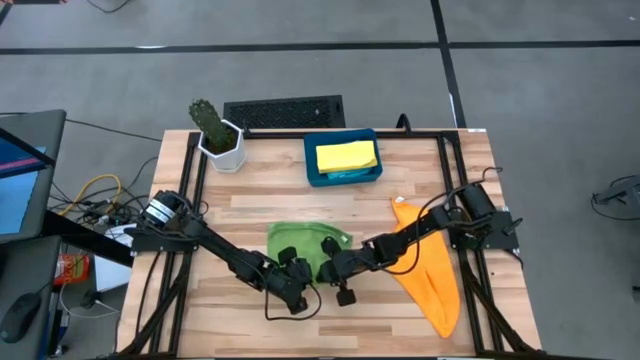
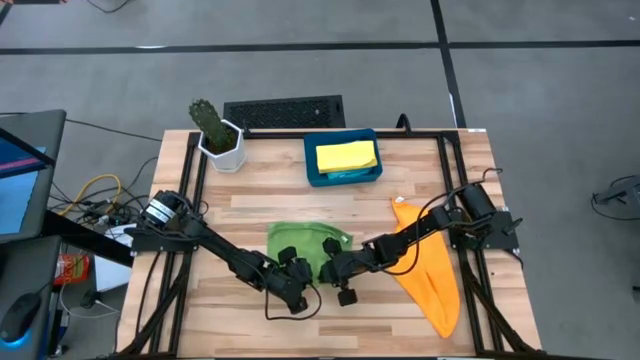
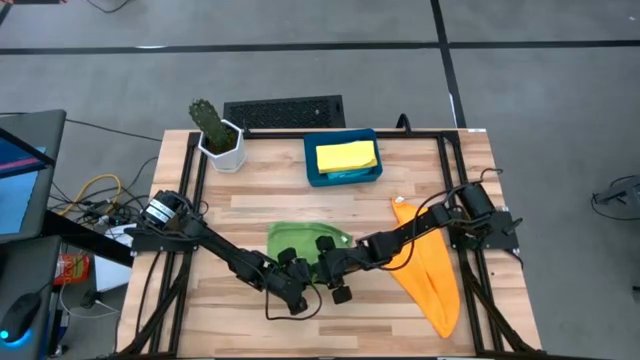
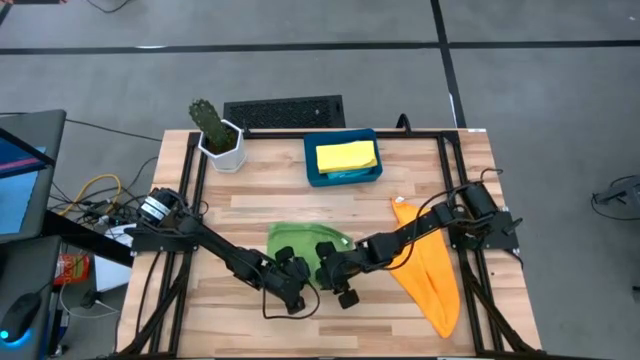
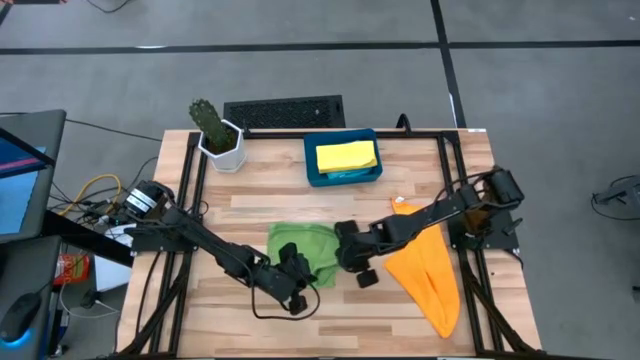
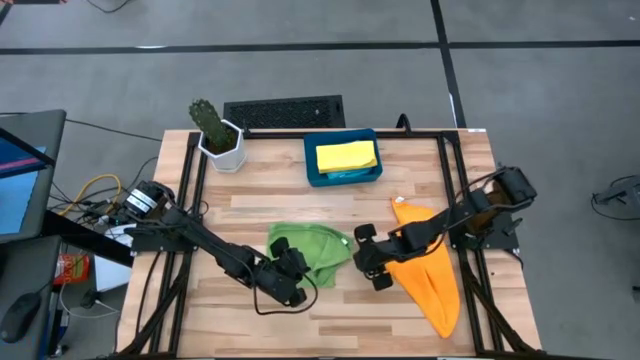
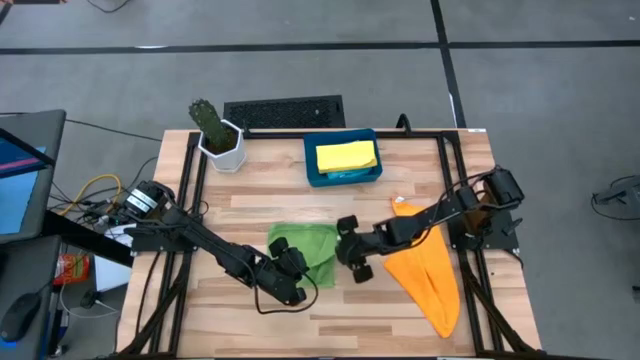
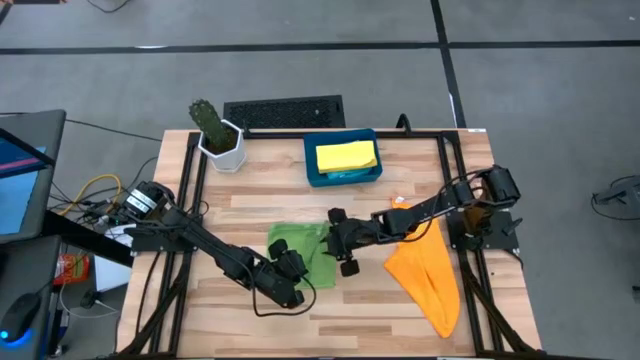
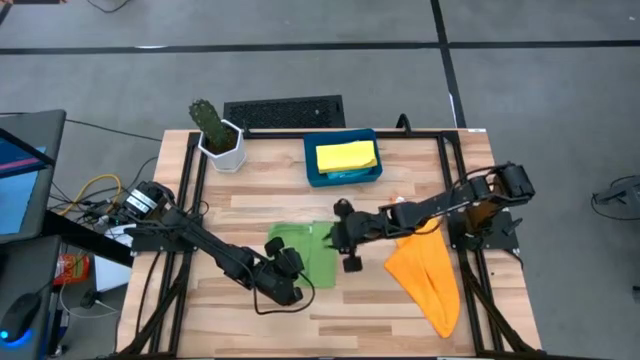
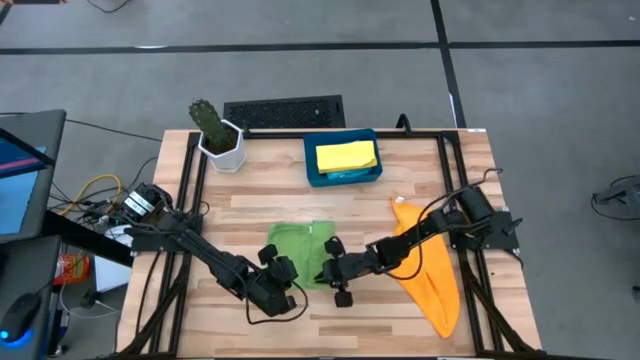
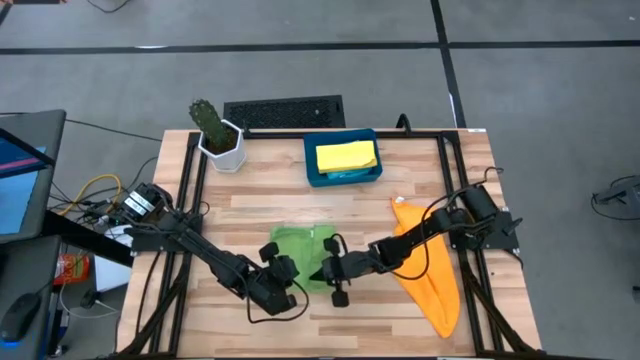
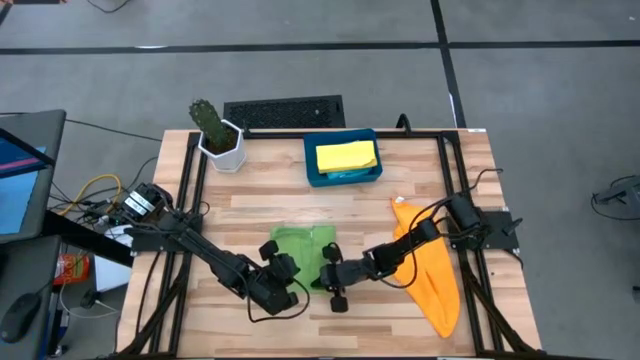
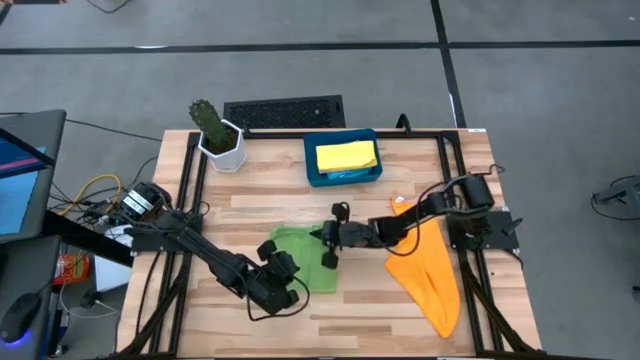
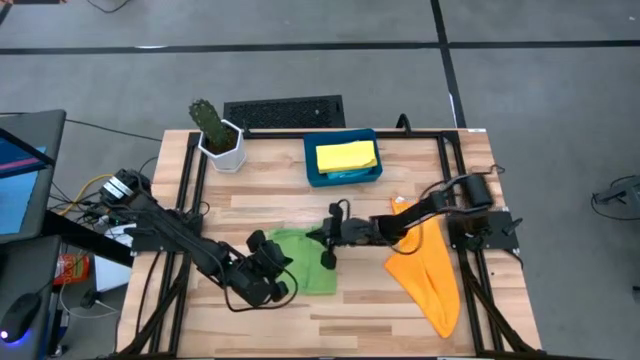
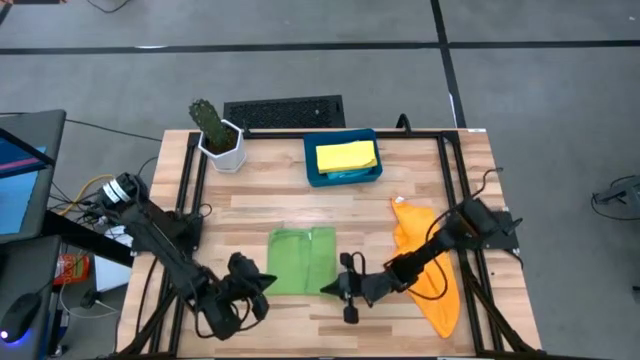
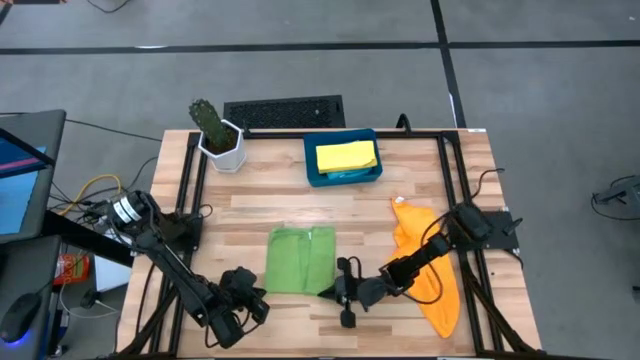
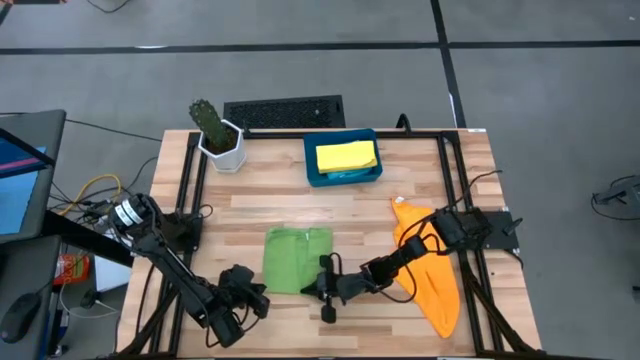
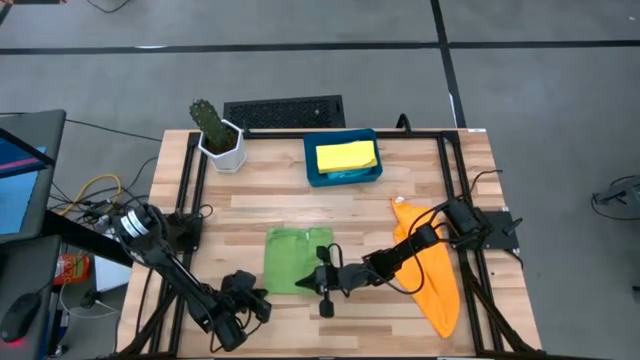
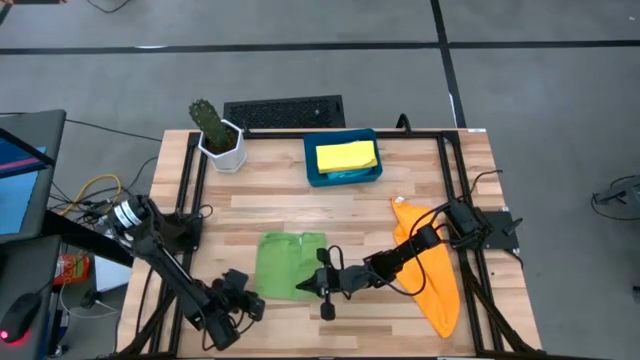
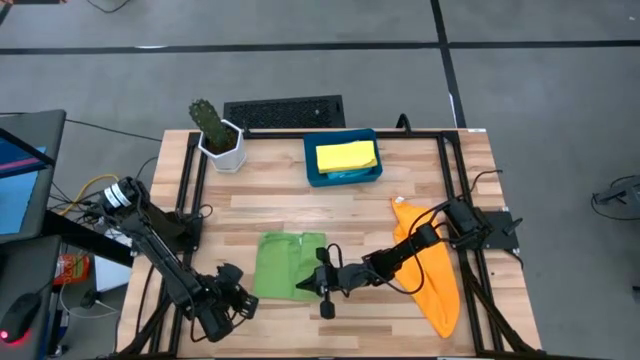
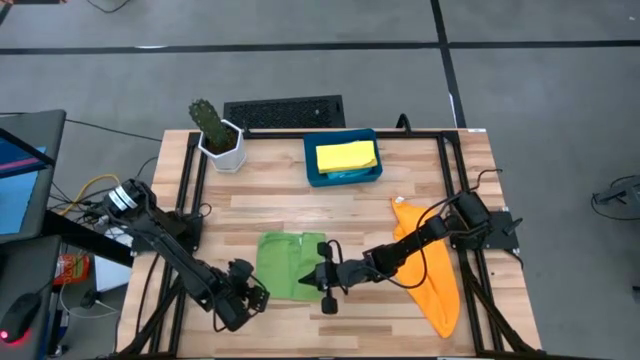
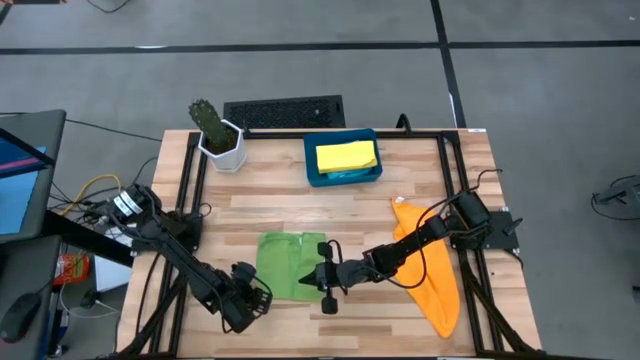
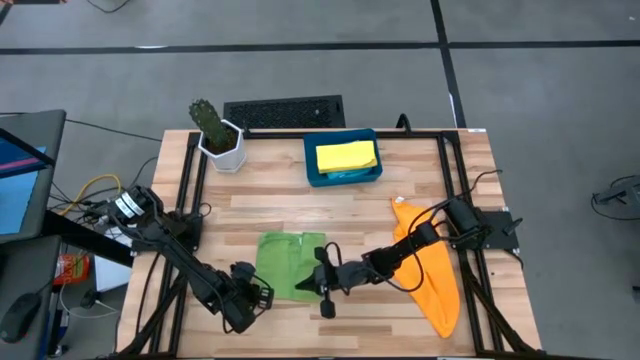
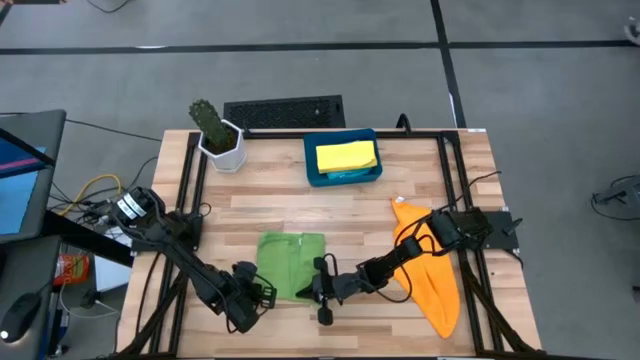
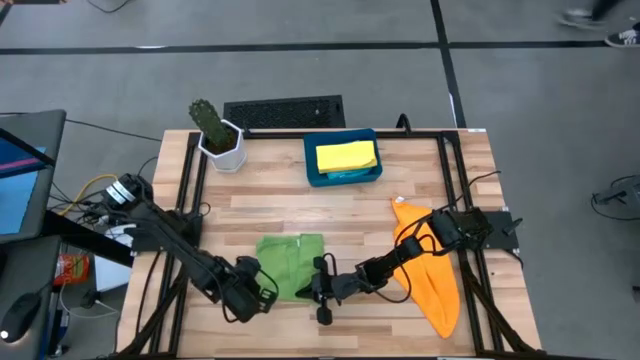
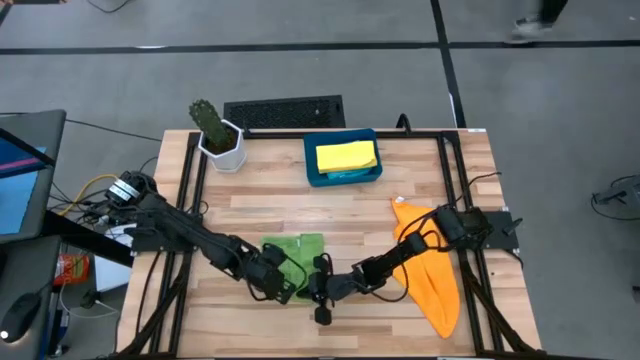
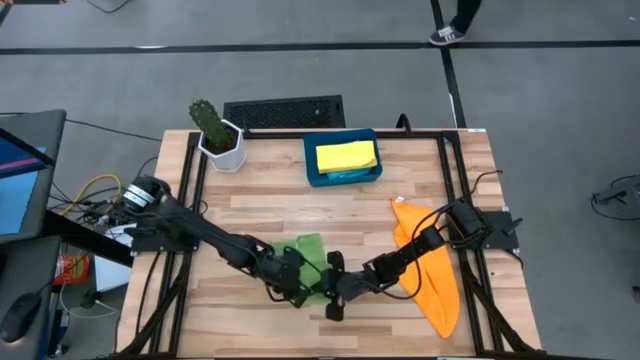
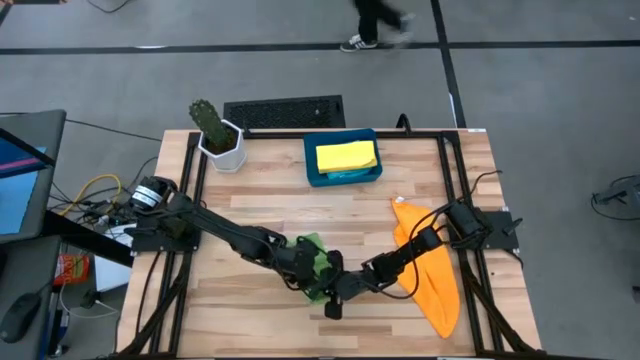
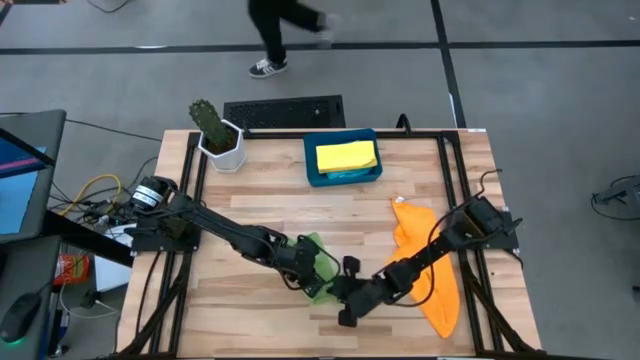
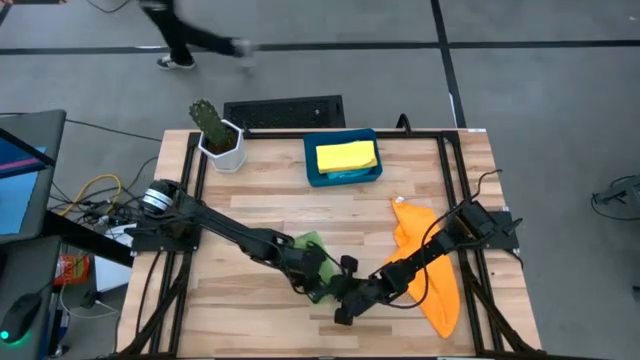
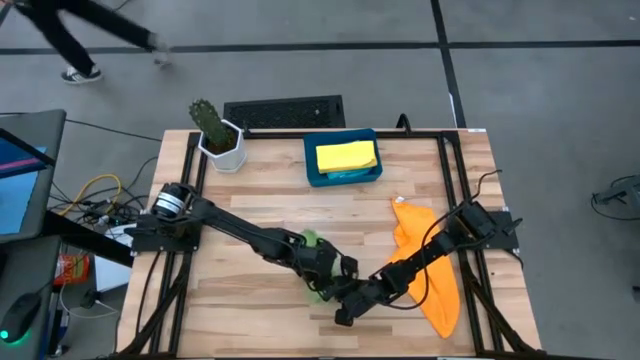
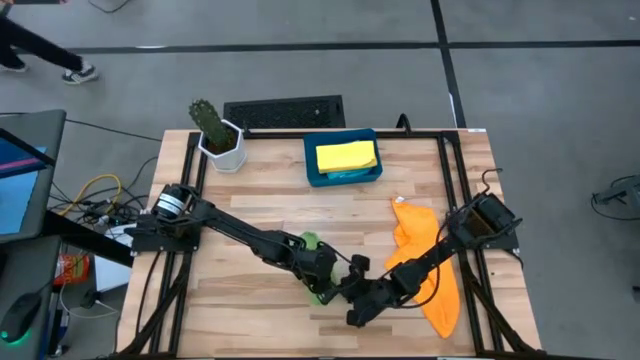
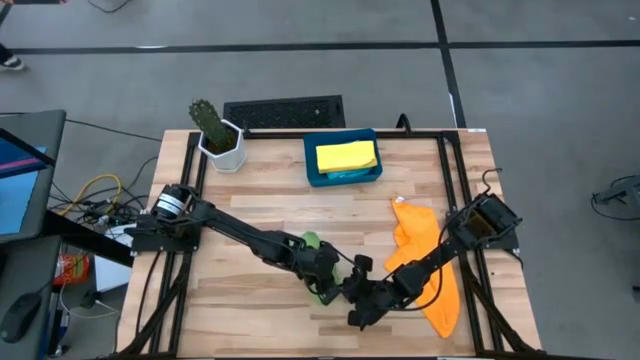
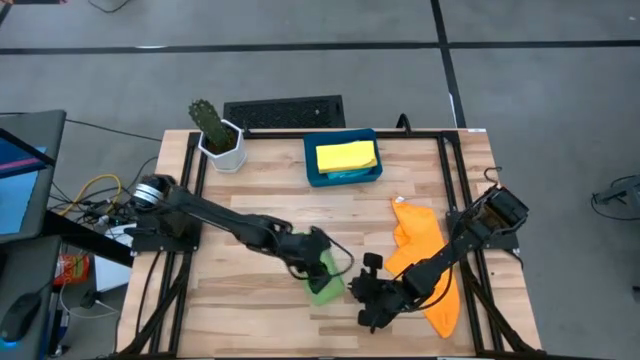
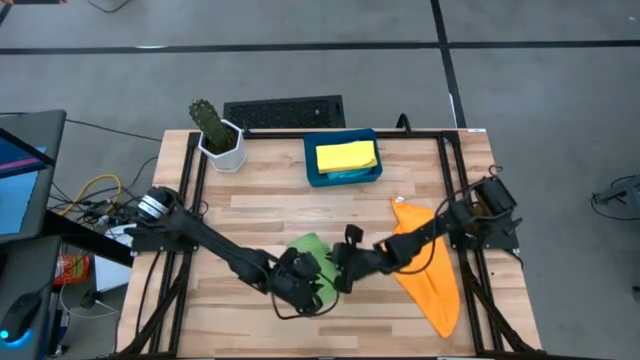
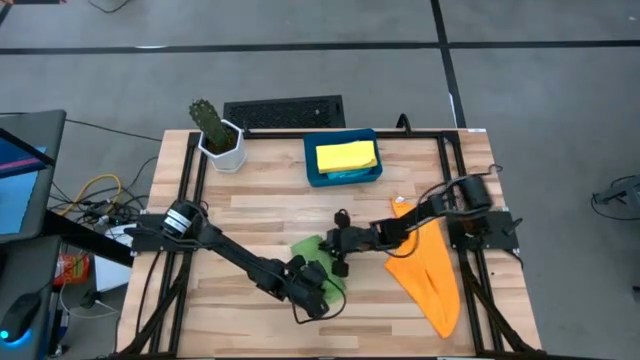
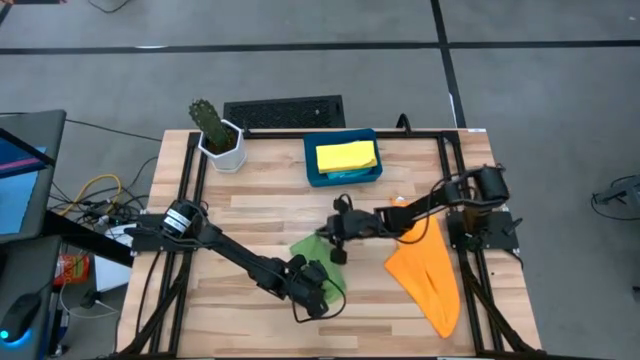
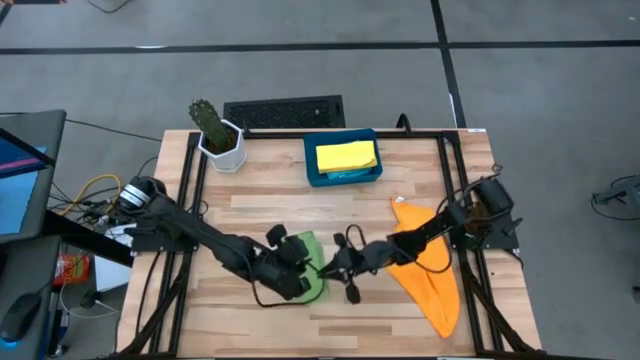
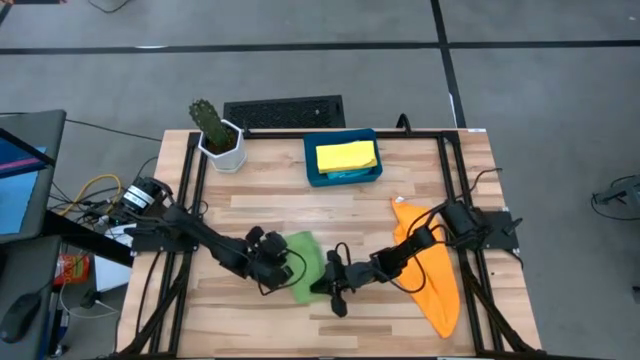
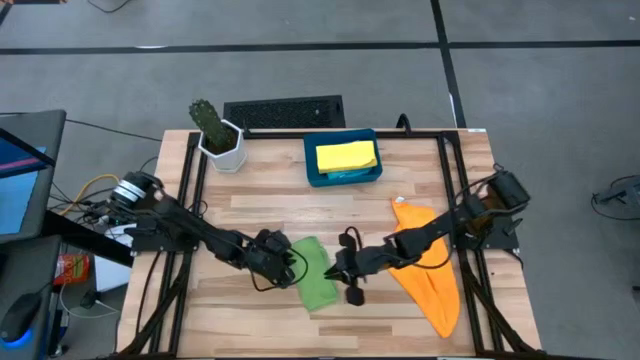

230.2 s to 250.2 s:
Task: Fold microfiber towels
Fold the green microfiber cloth
